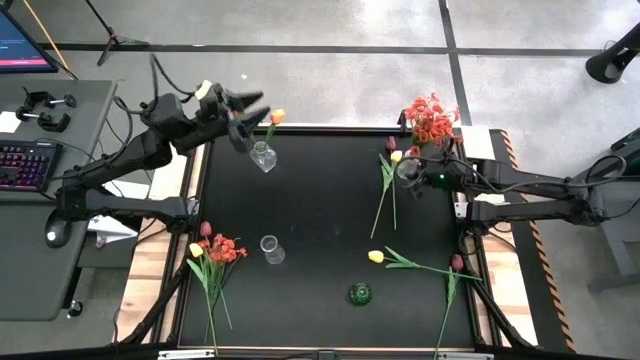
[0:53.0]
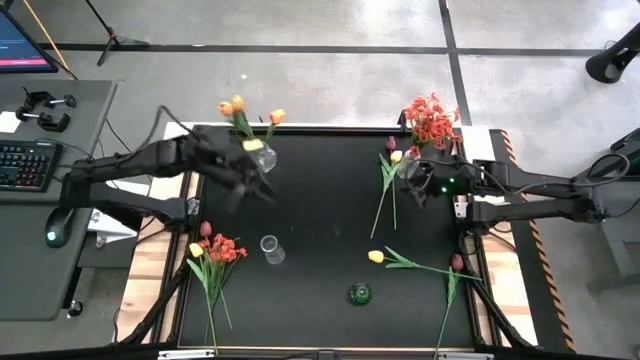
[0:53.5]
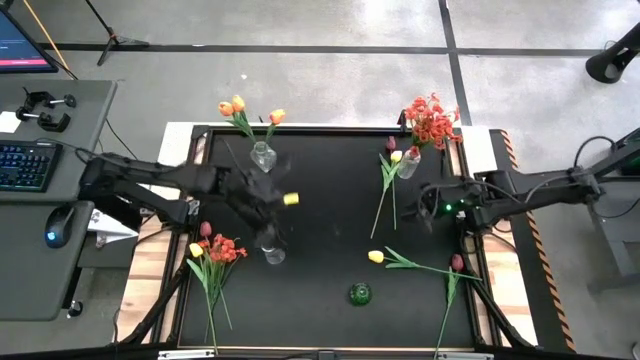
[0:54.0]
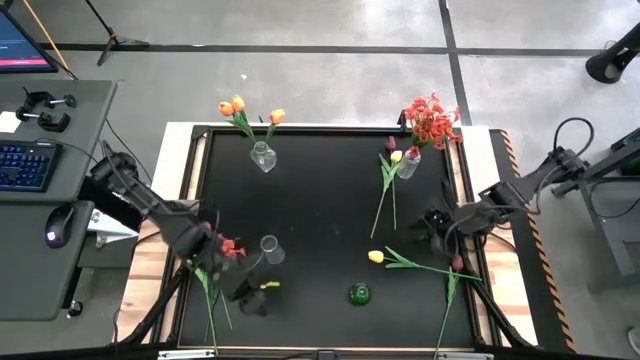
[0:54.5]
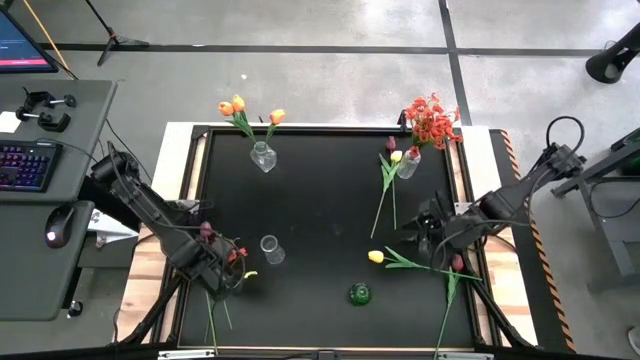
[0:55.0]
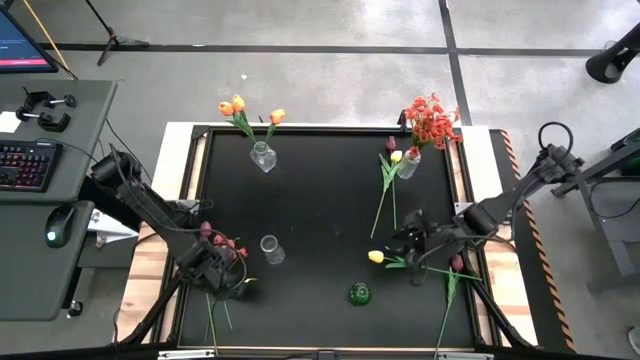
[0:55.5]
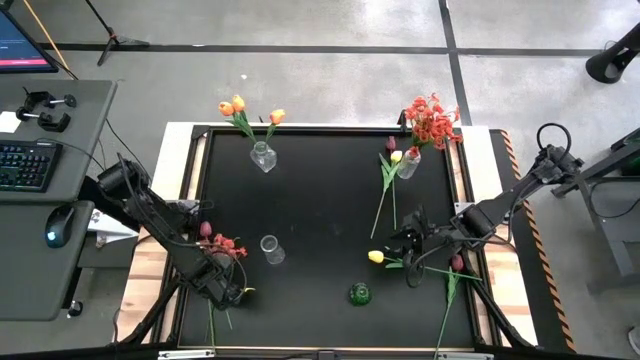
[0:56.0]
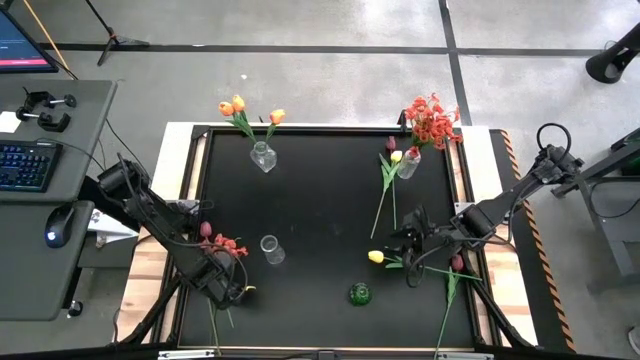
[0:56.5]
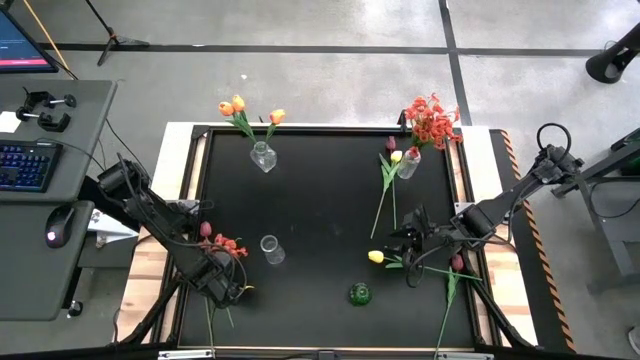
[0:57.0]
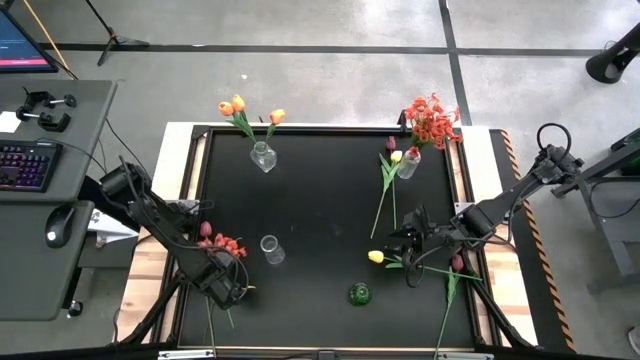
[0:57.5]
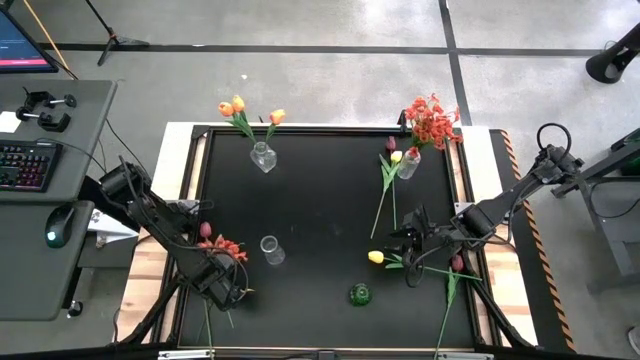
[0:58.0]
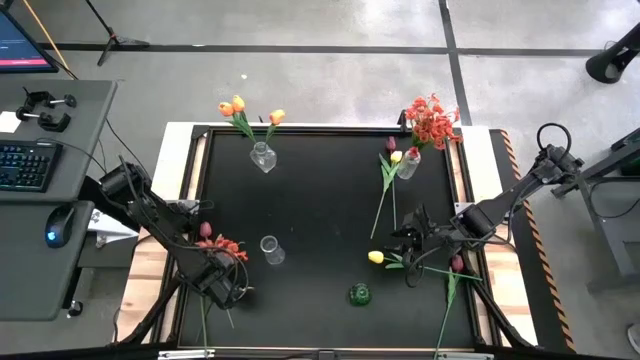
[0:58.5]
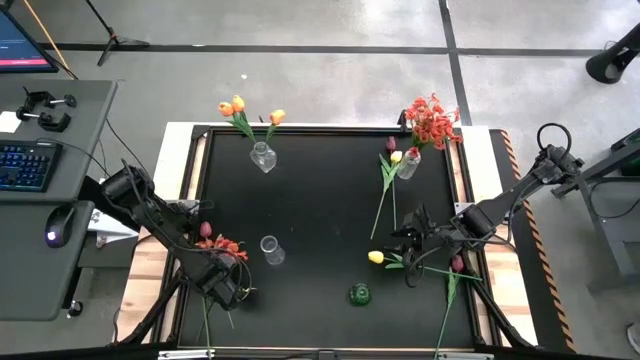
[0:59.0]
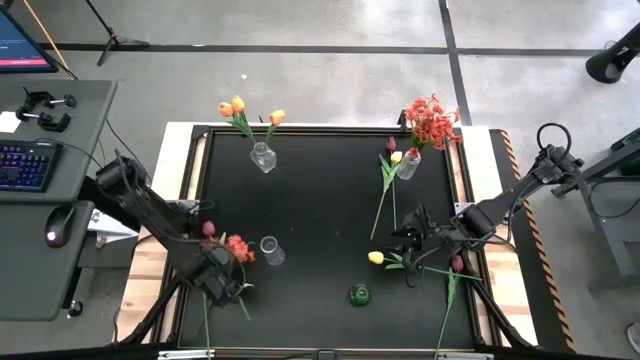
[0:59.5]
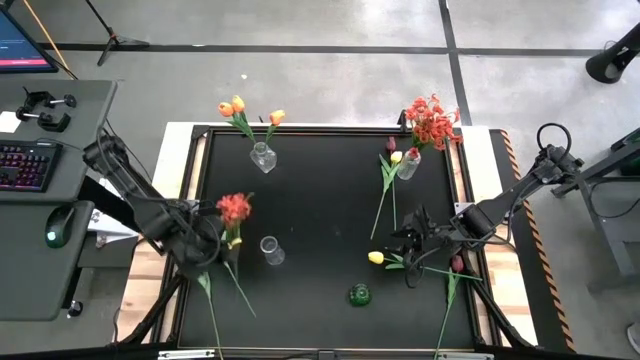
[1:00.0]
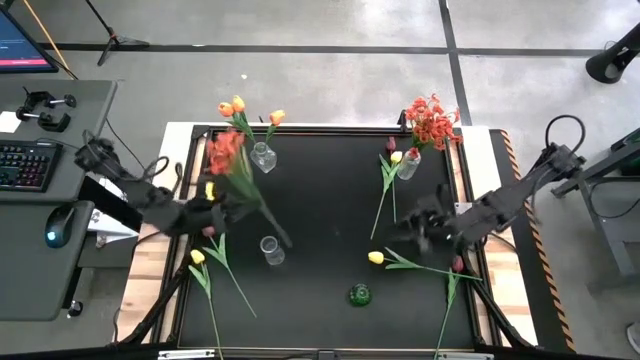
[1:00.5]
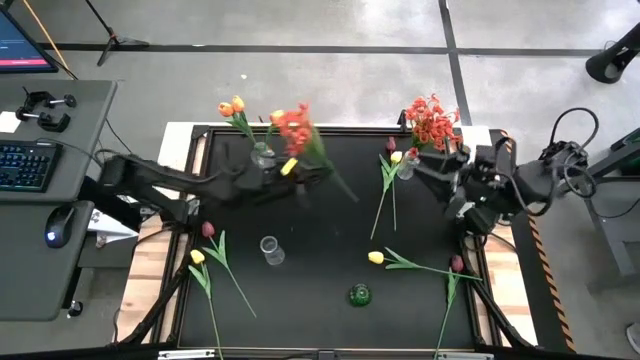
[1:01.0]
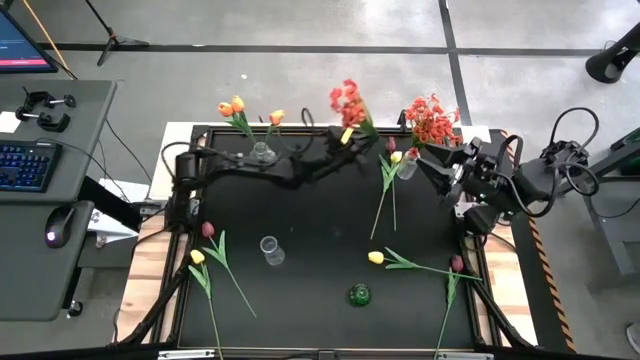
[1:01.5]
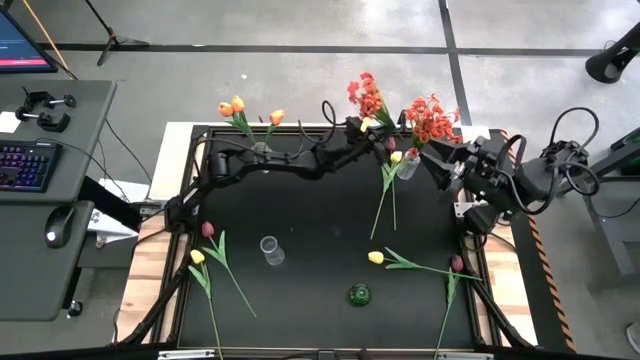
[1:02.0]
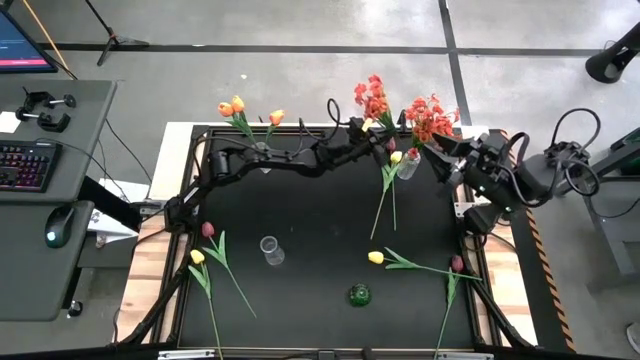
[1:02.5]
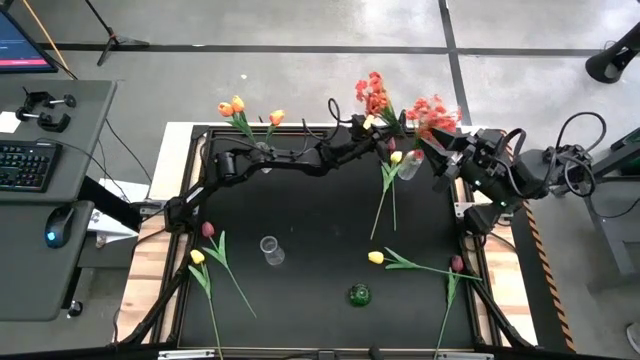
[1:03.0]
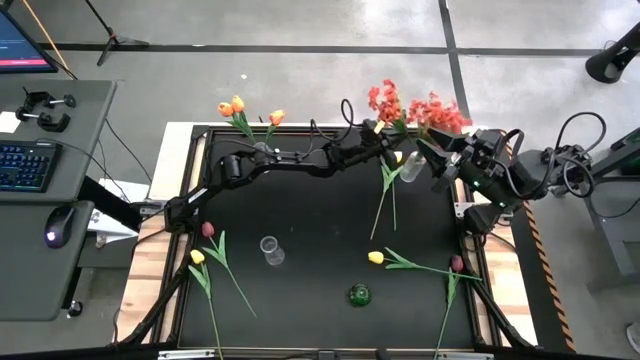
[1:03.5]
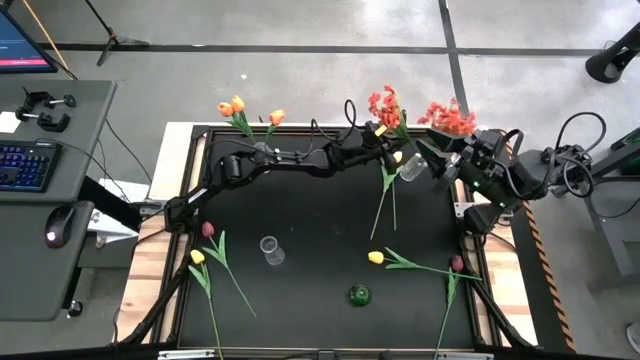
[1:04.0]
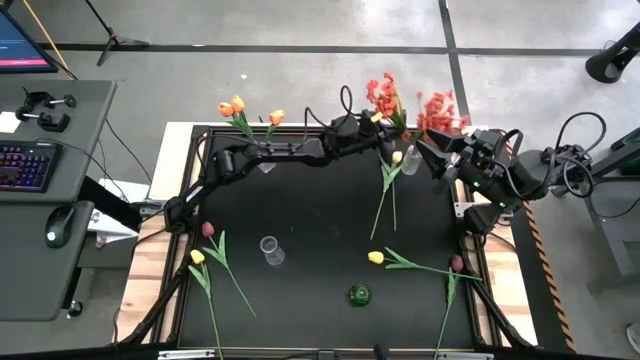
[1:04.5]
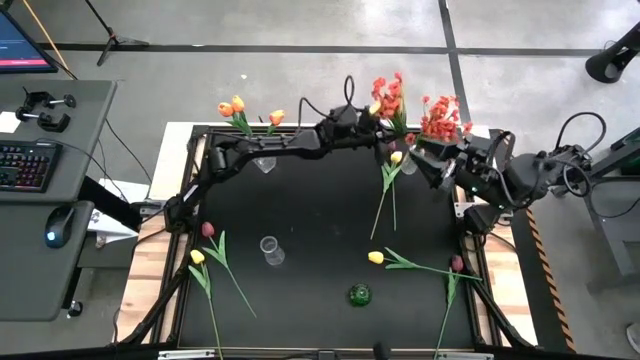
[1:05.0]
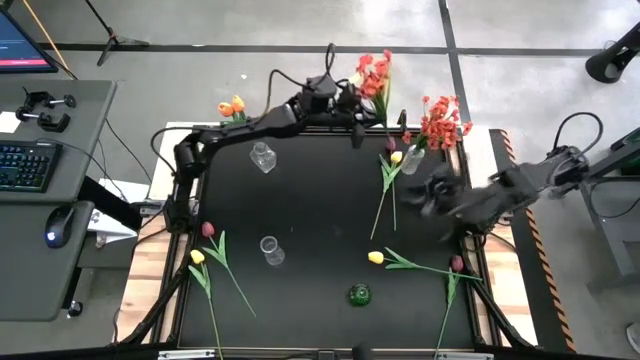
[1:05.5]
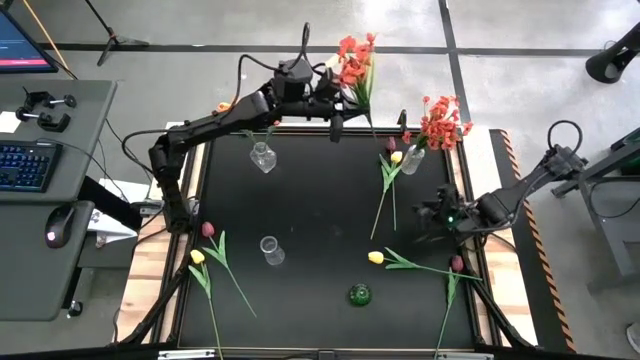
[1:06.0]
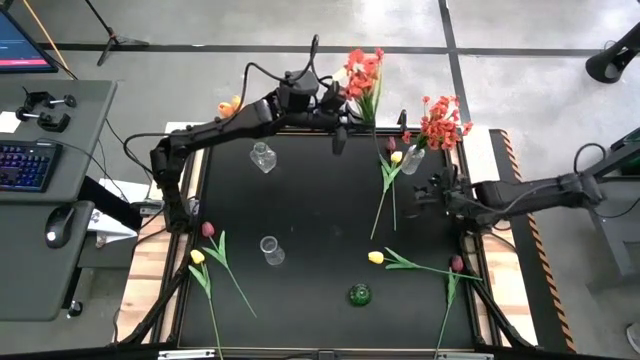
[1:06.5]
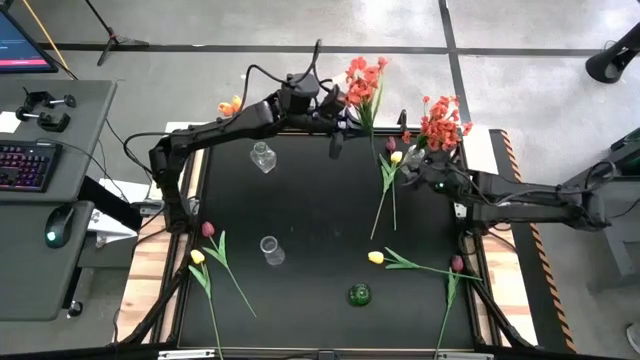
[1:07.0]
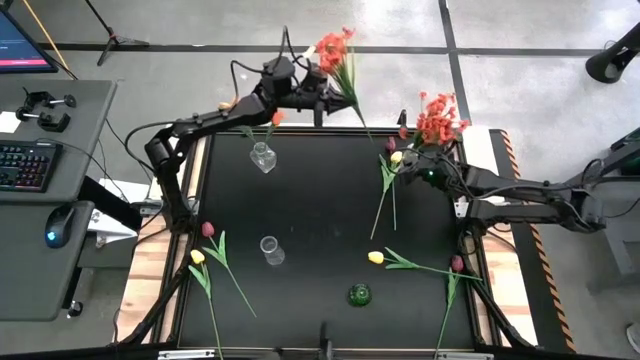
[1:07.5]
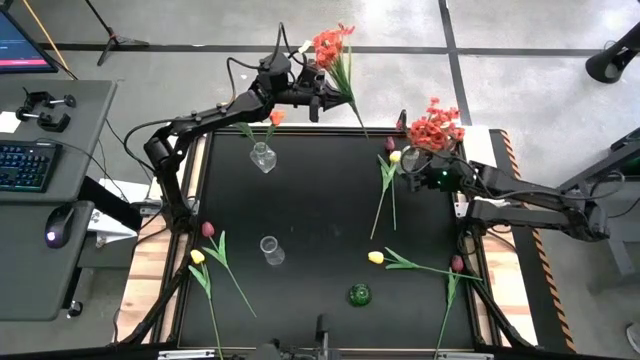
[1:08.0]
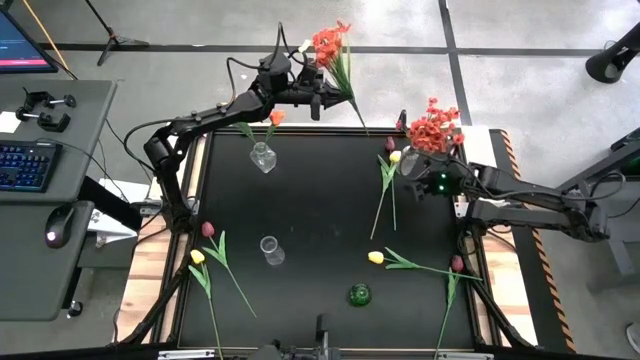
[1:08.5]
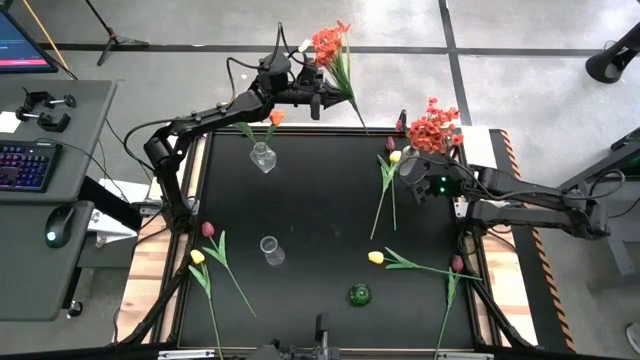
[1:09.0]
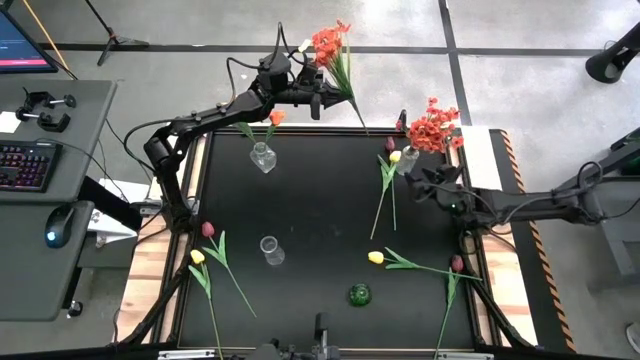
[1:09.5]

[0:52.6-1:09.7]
Task: Sort flowers into vase by color
Put the red flowers into the top right transparent vase
